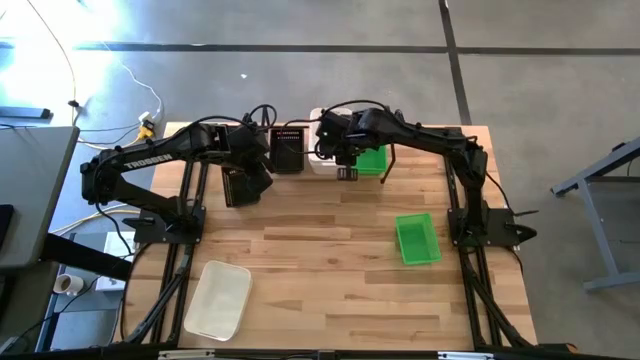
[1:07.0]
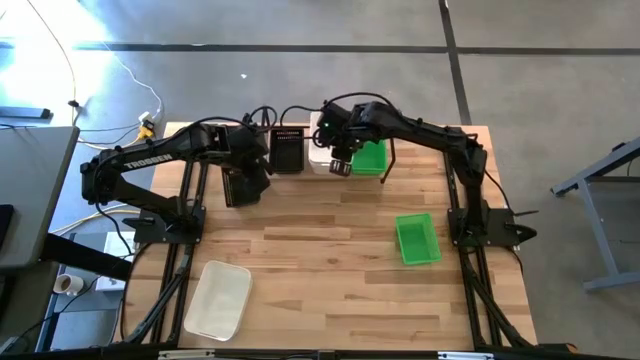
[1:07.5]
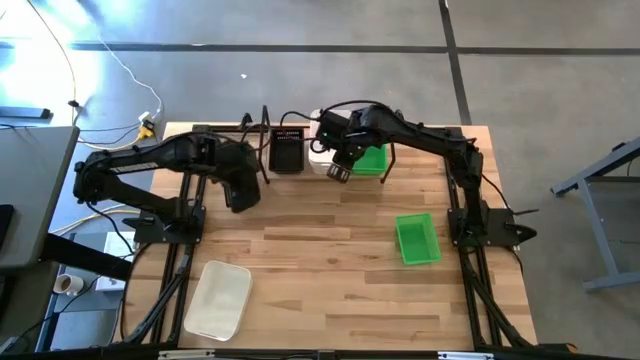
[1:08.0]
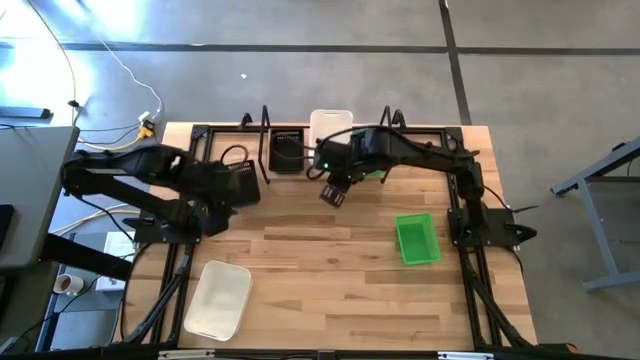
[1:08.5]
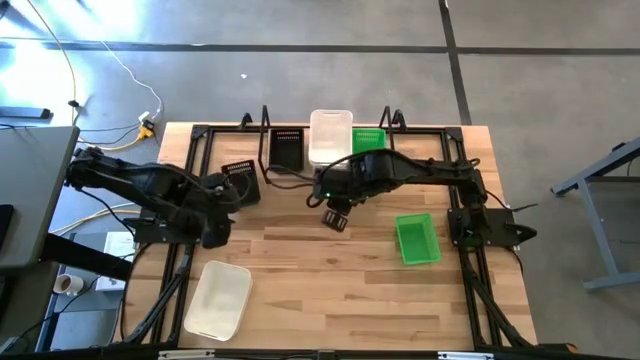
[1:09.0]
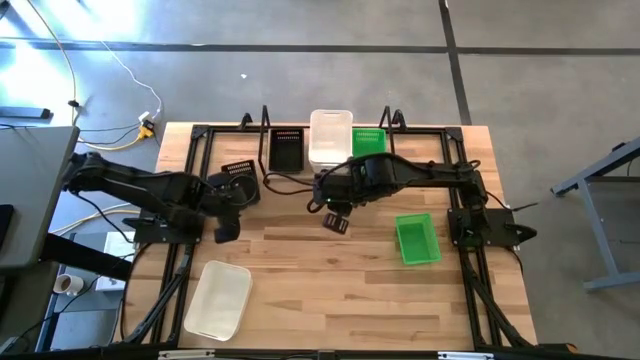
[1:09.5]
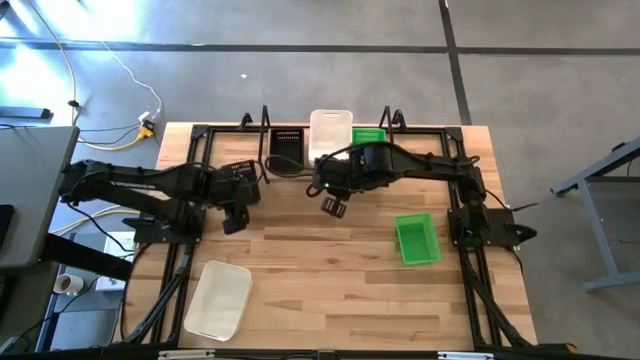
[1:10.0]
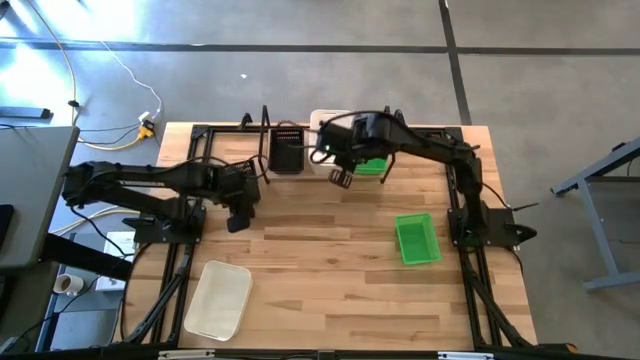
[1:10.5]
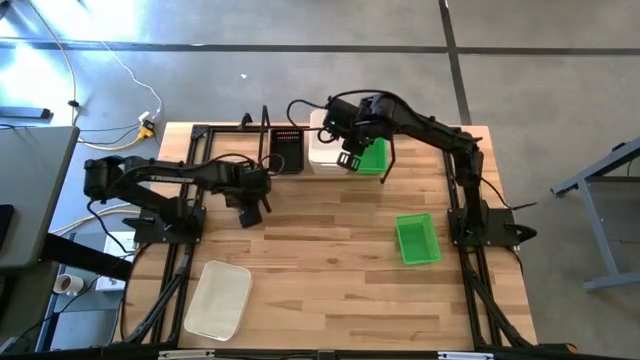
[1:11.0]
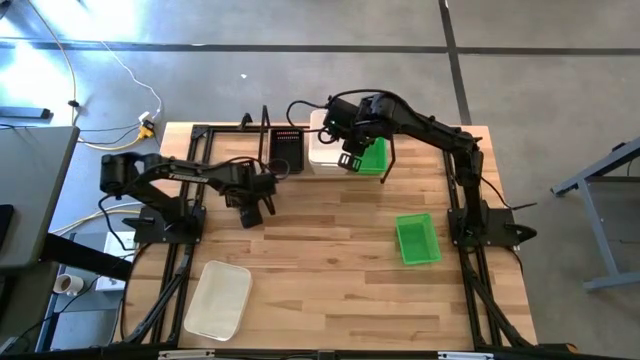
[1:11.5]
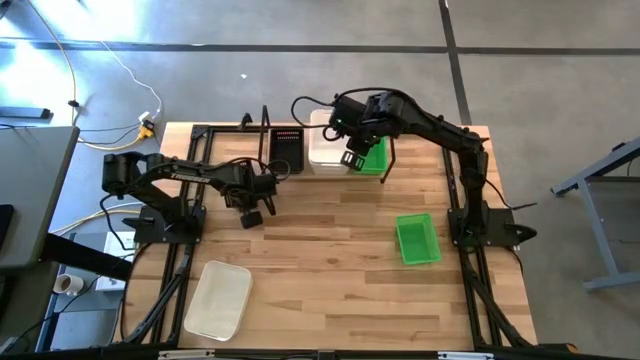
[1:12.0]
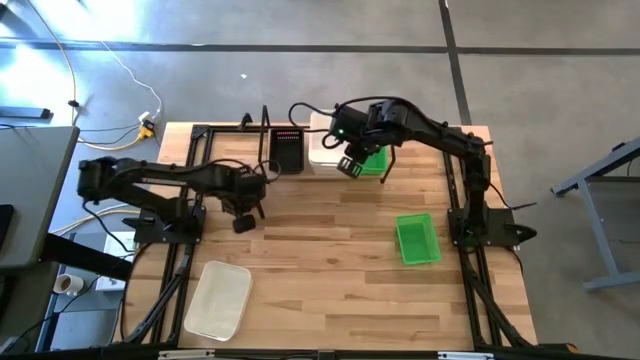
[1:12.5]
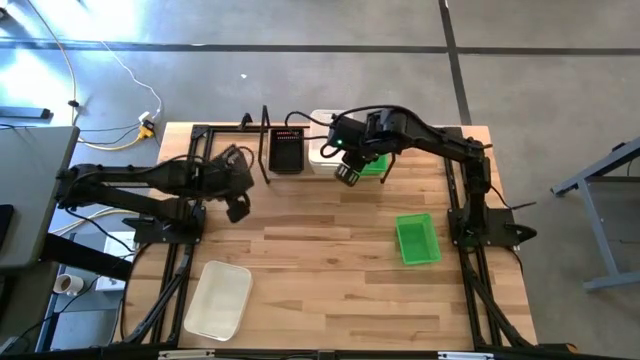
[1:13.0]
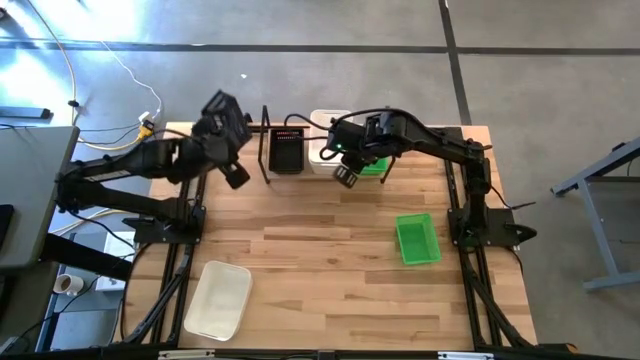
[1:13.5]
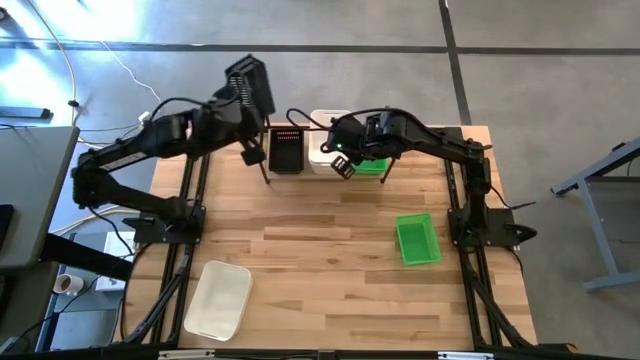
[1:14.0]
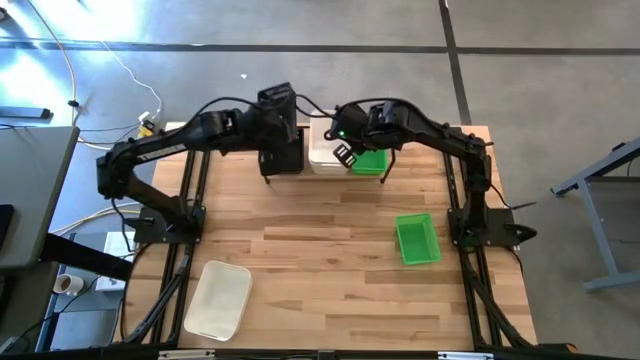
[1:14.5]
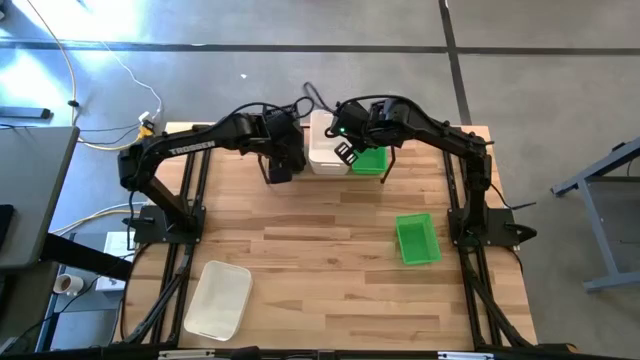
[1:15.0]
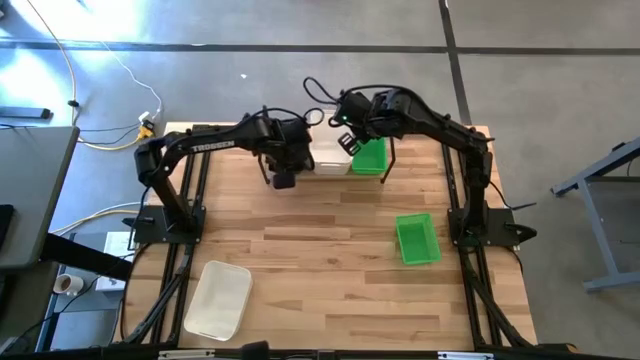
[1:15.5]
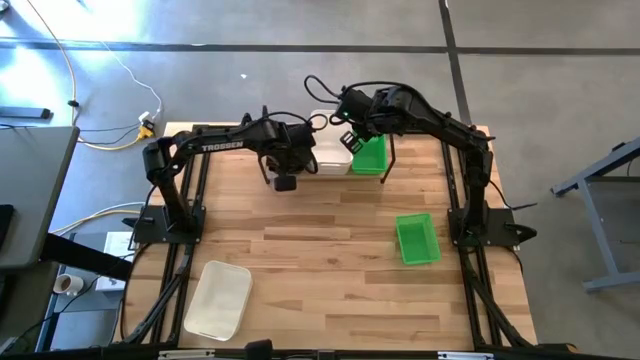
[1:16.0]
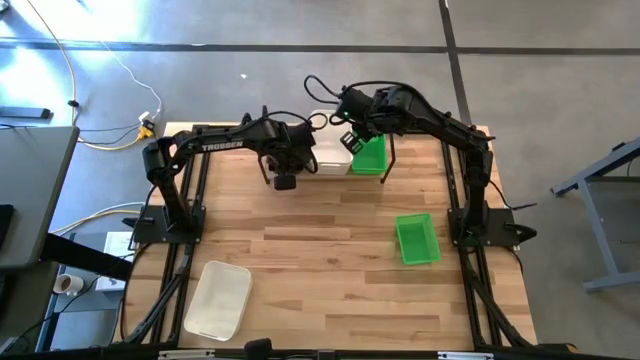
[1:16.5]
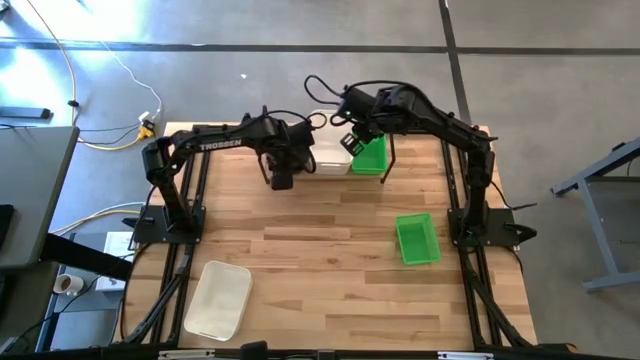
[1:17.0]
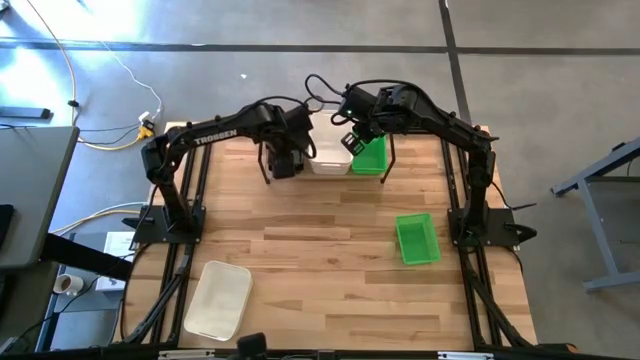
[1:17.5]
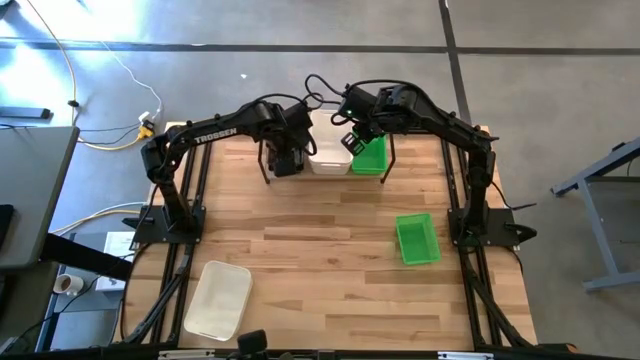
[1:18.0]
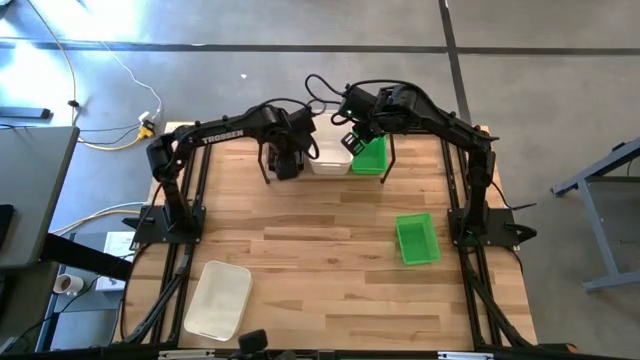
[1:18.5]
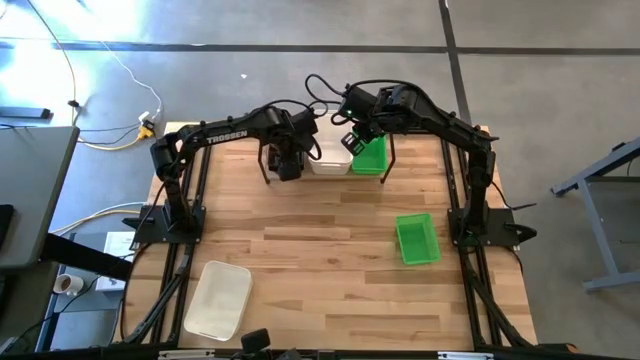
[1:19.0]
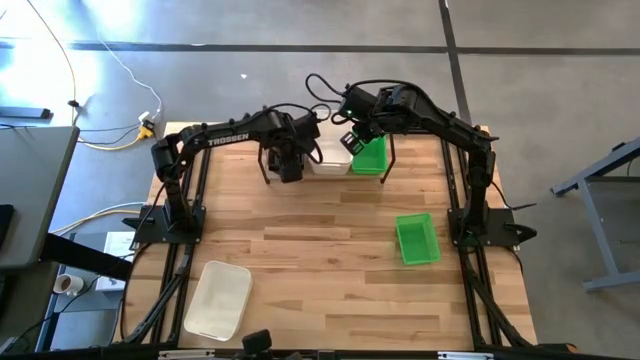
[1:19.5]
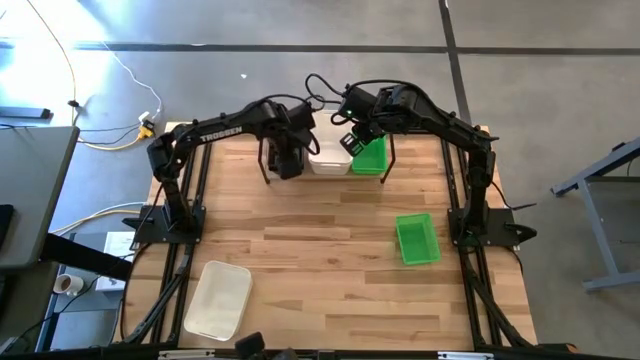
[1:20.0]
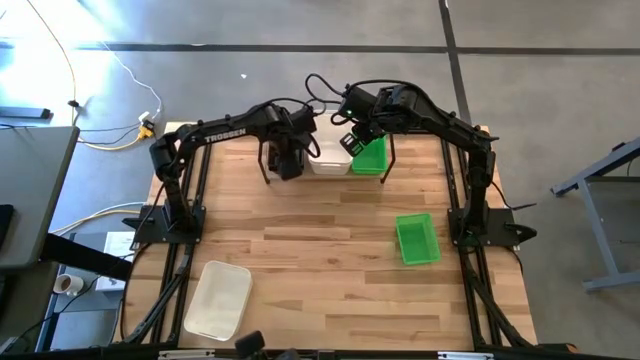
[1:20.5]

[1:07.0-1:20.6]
Task: Stack baskets on shelf by color
Stack the black basket on top of the other black baskets on the shelf

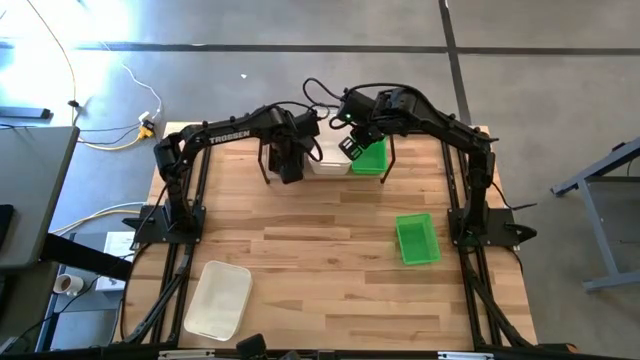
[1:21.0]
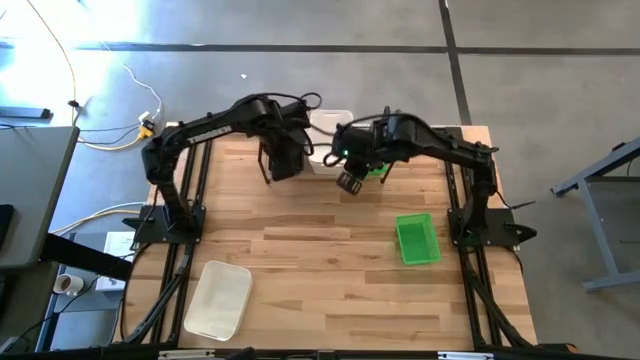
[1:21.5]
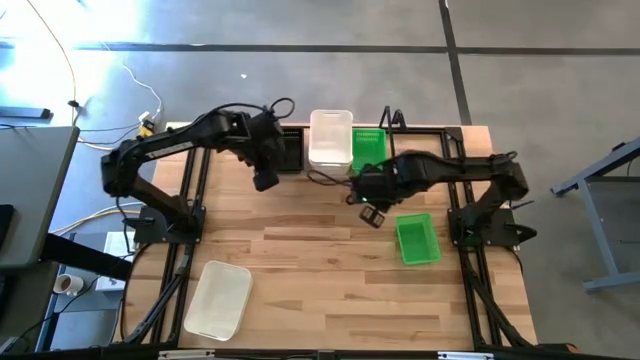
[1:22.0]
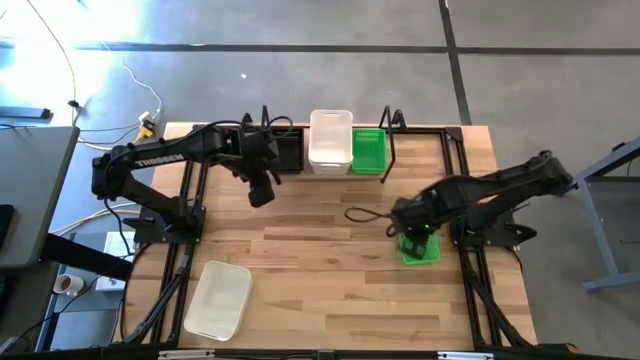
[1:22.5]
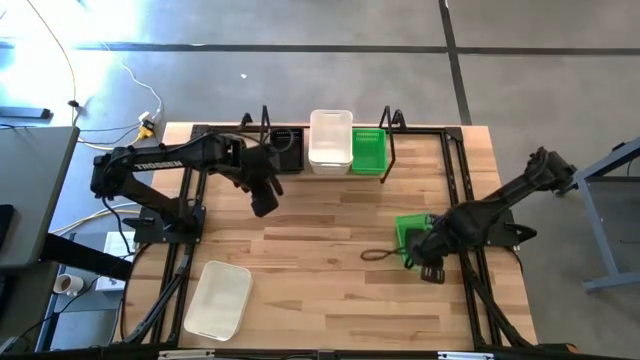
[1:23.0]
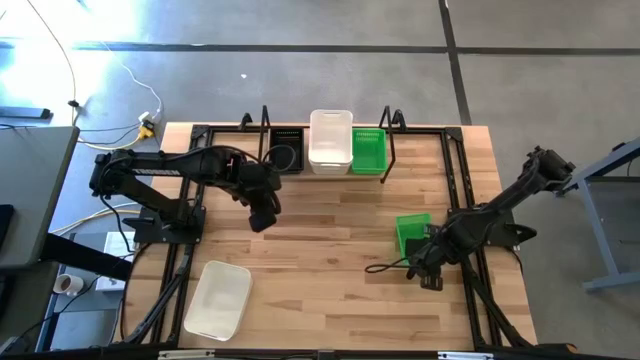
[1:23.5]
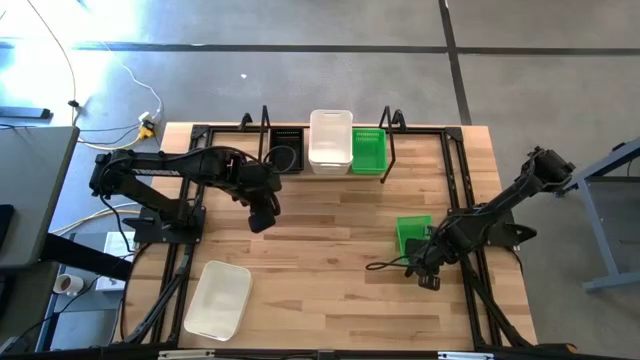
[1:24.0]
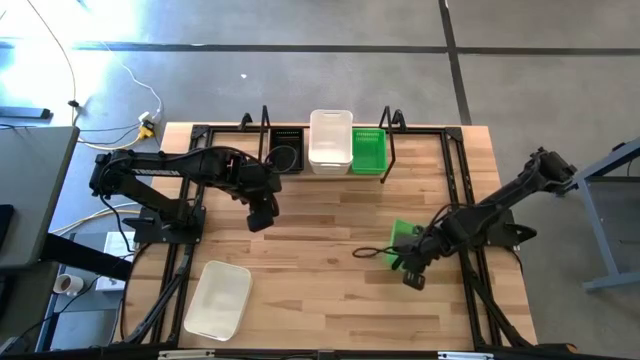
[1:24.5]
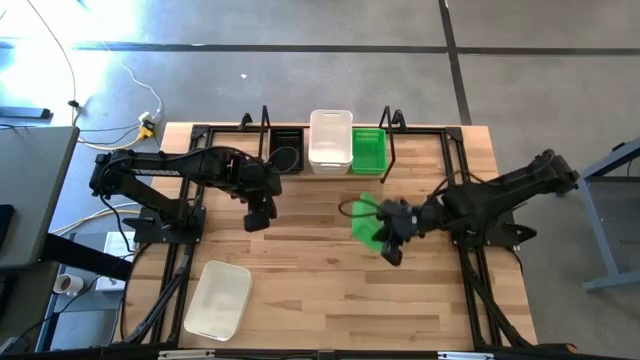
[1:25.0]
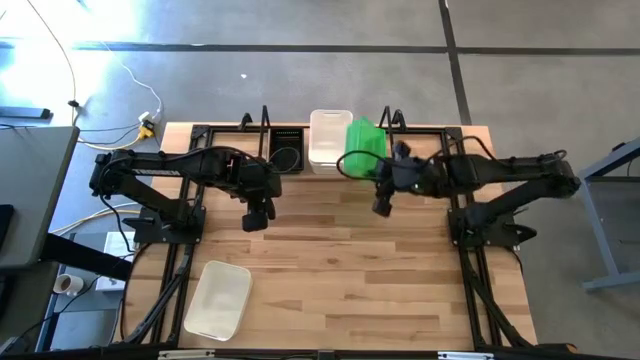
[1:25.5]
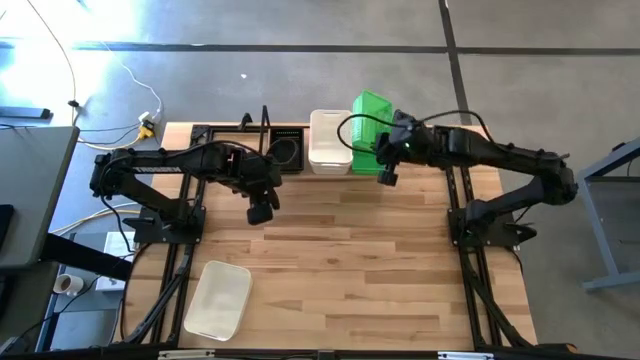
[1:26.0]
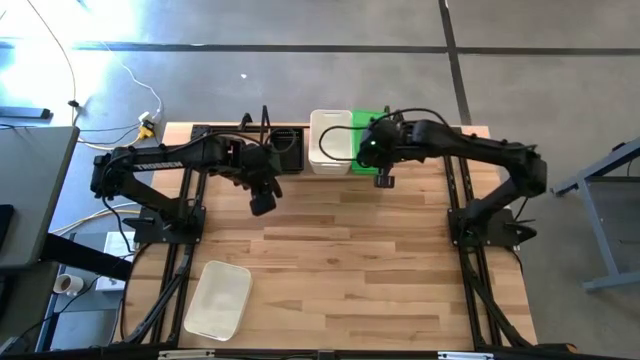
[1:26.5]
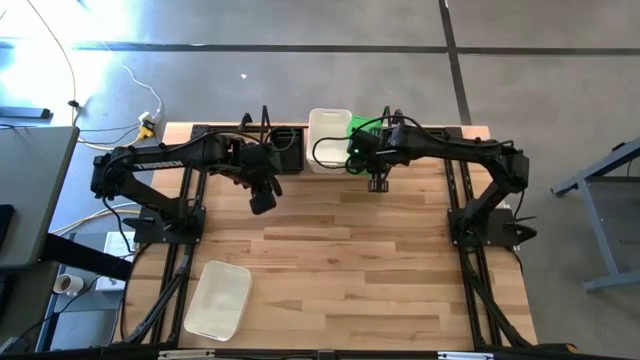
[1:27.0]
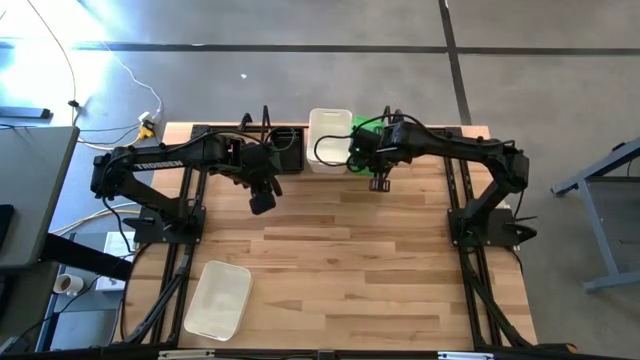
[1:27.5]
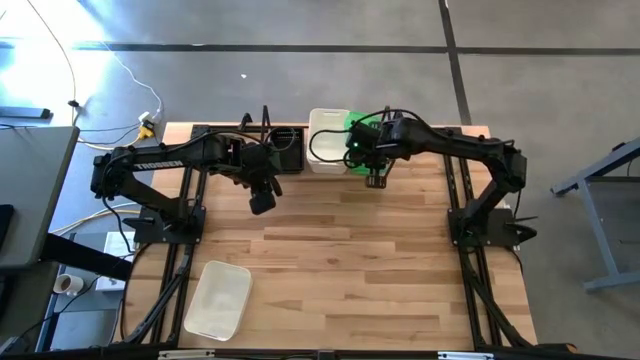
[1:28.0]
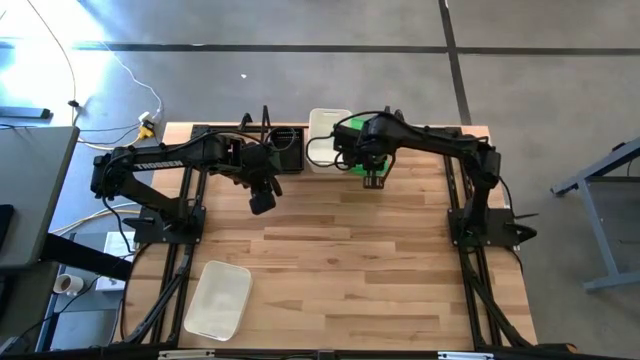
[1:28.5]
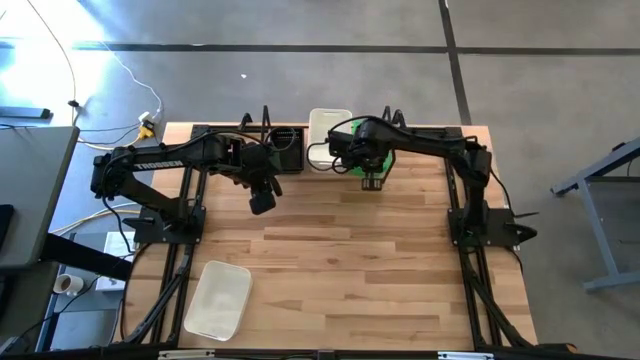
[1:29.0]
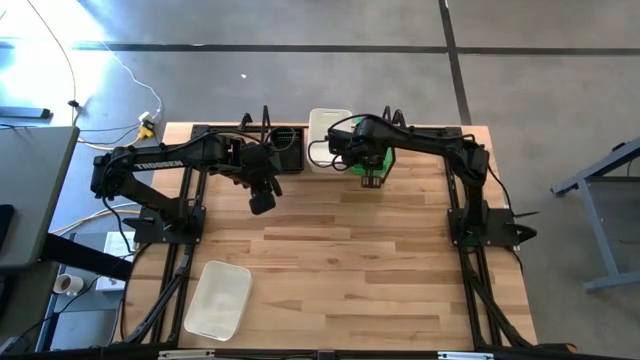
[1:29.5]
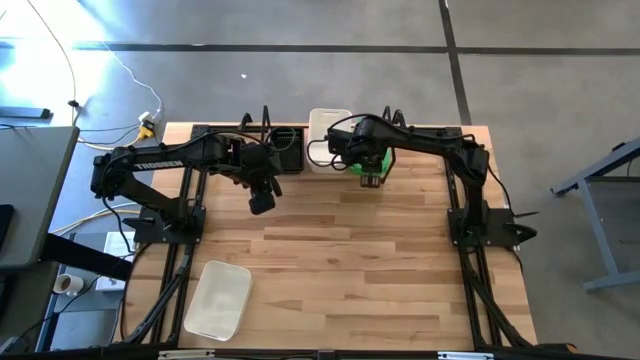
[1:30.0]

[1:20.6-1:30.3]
Stack the green basket on top of the other green baskets on the shelf
